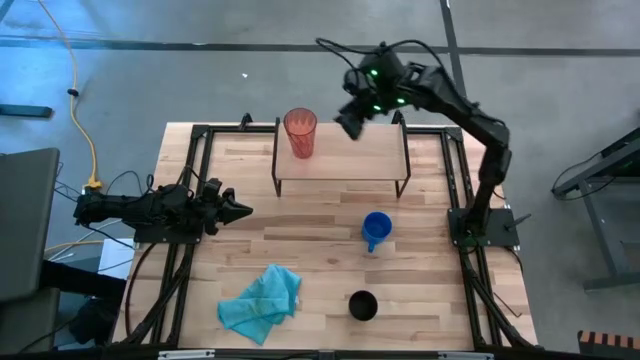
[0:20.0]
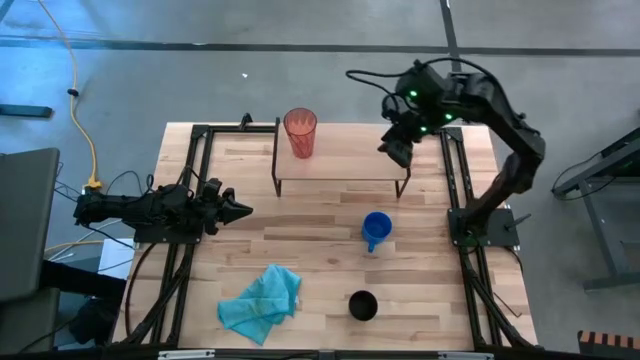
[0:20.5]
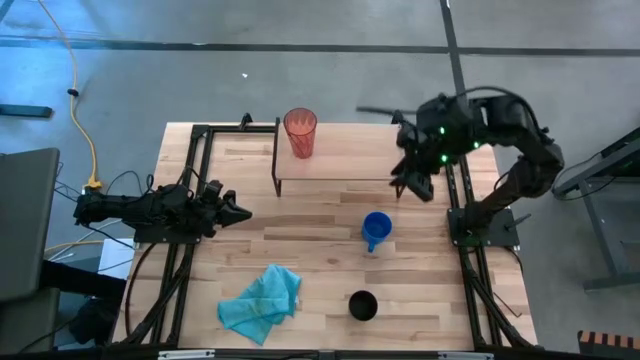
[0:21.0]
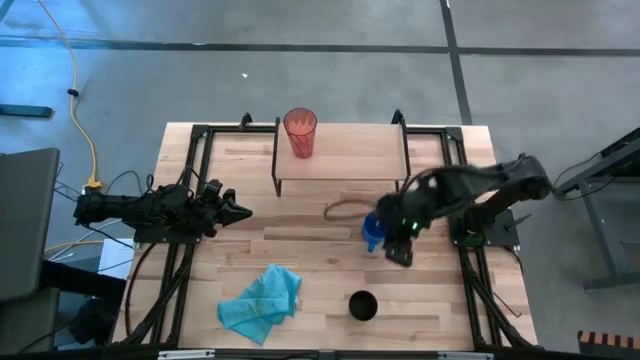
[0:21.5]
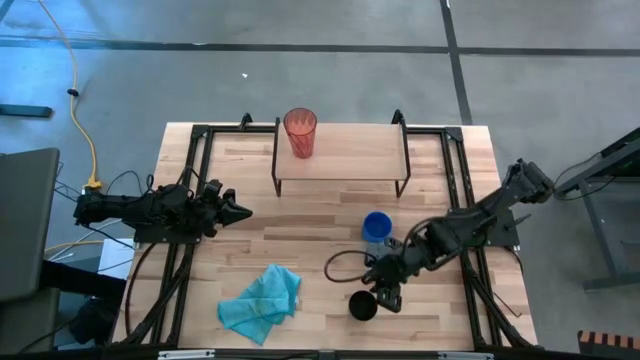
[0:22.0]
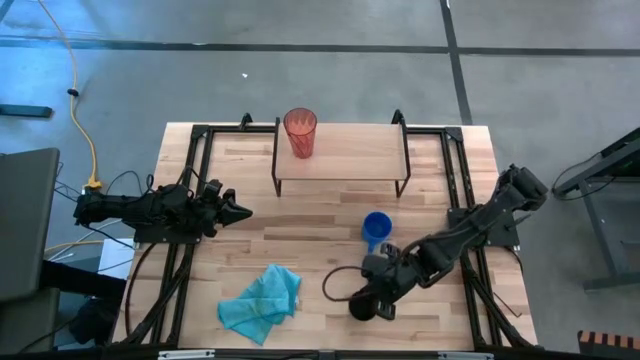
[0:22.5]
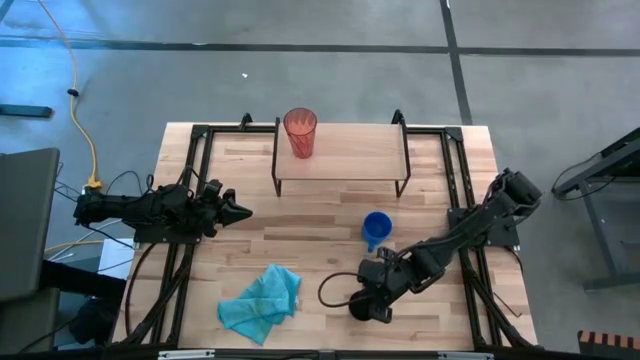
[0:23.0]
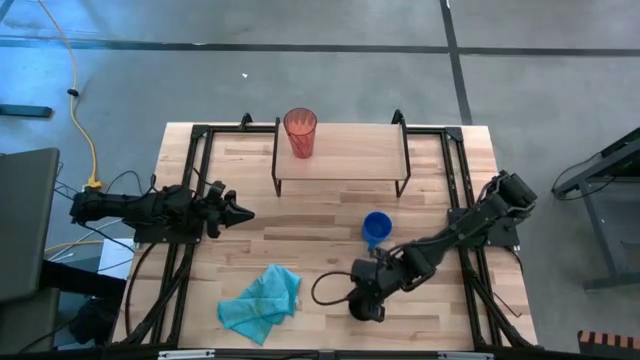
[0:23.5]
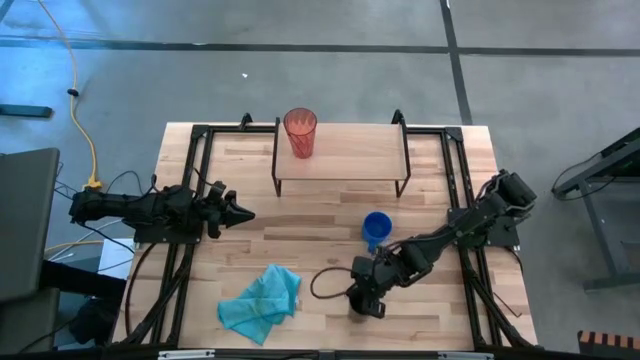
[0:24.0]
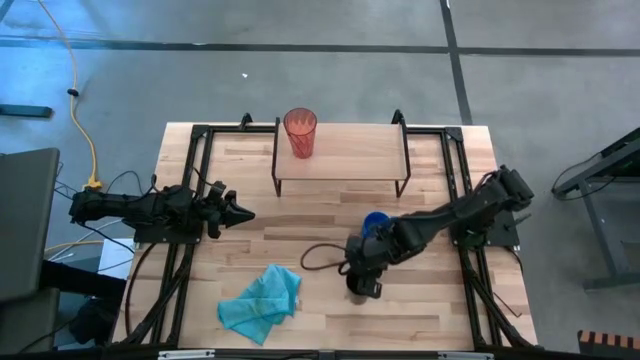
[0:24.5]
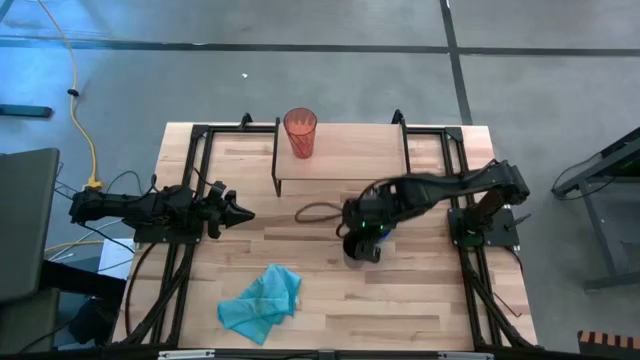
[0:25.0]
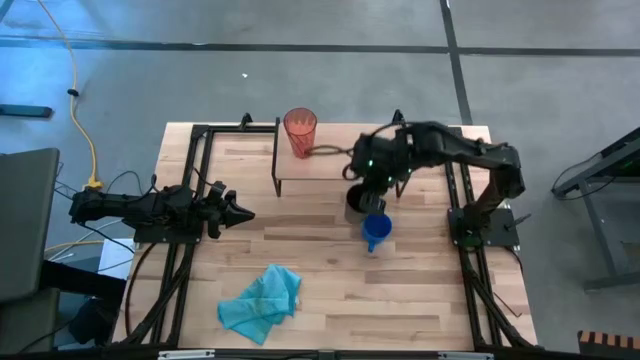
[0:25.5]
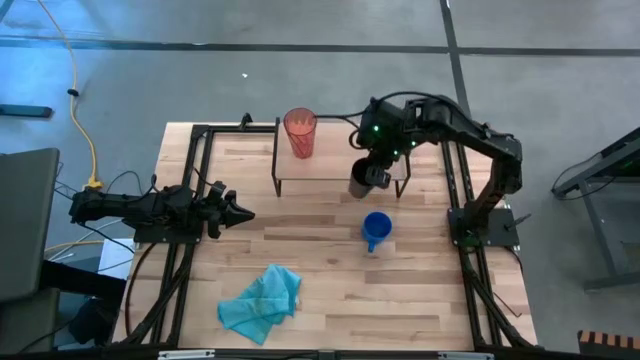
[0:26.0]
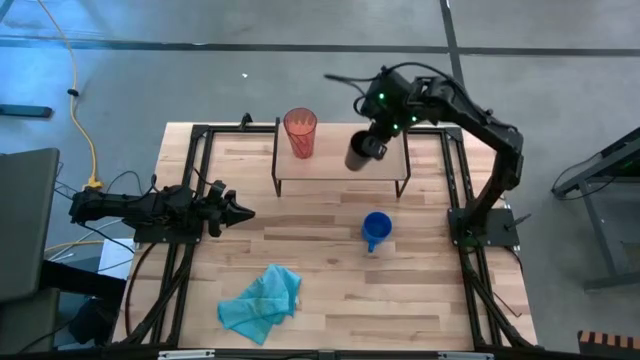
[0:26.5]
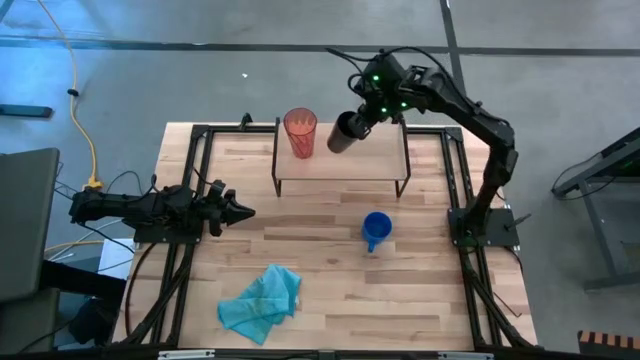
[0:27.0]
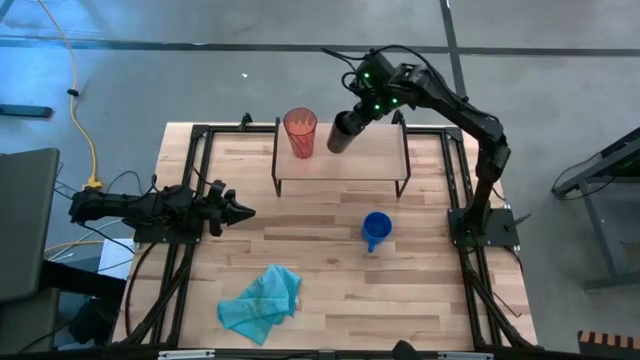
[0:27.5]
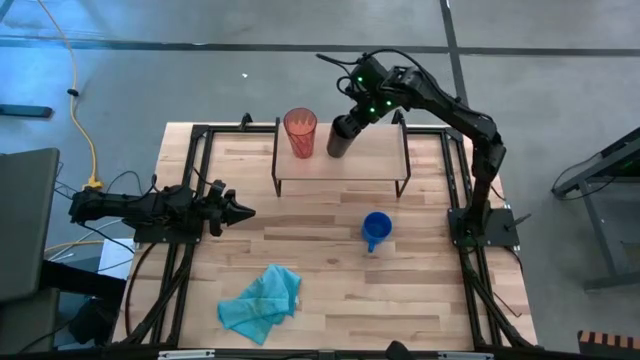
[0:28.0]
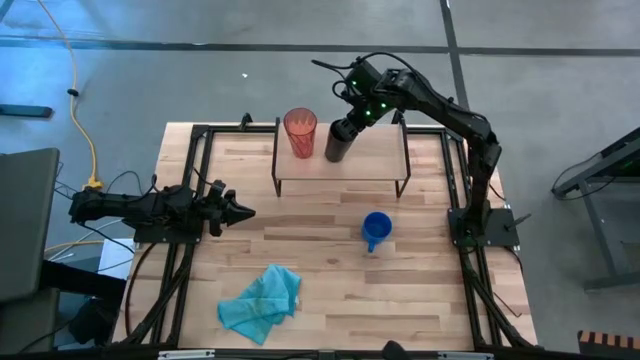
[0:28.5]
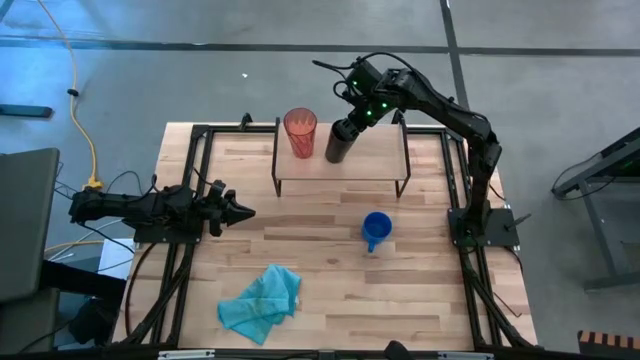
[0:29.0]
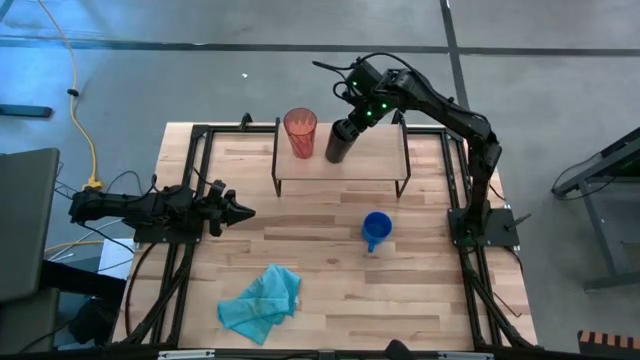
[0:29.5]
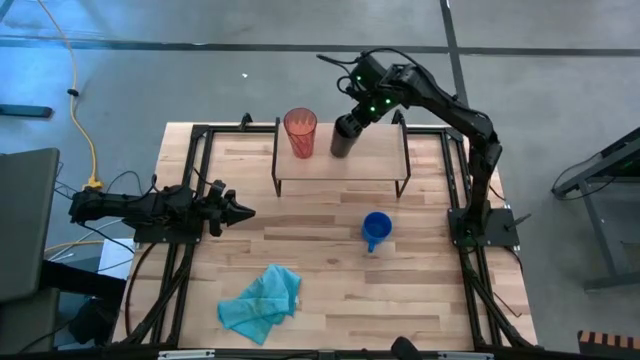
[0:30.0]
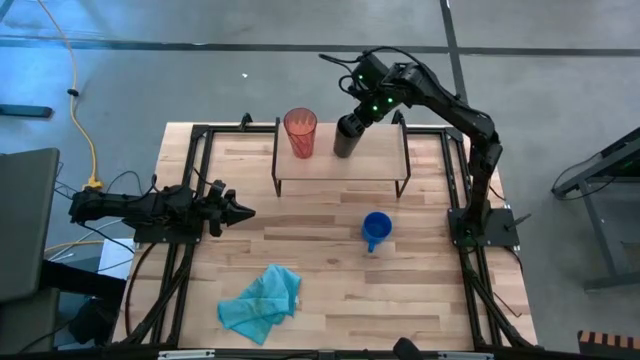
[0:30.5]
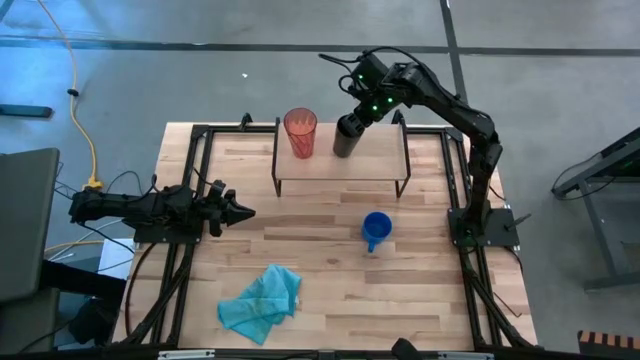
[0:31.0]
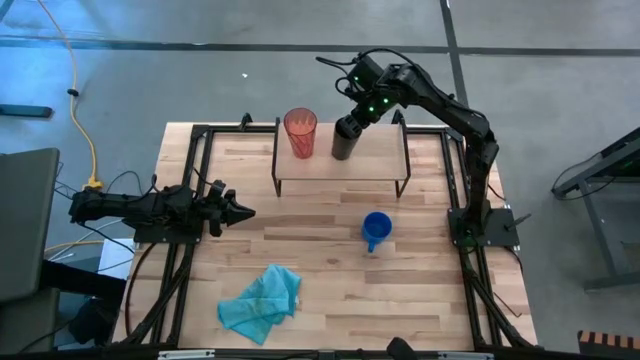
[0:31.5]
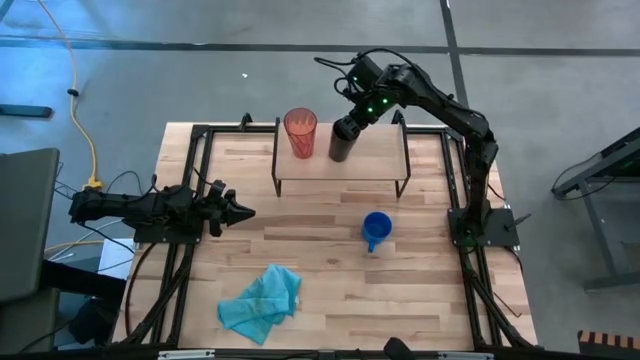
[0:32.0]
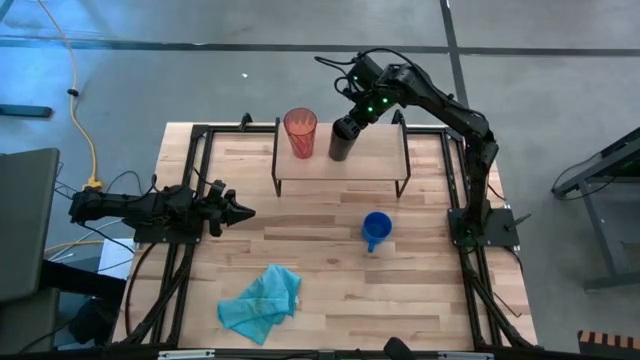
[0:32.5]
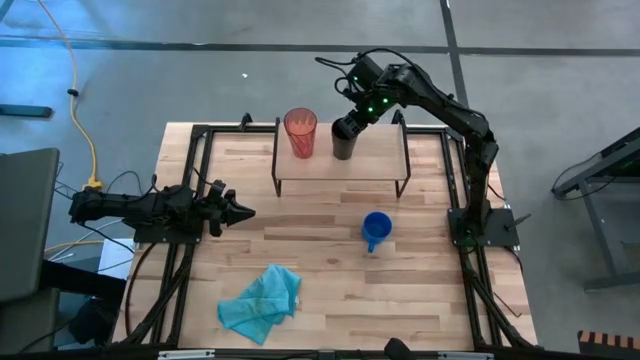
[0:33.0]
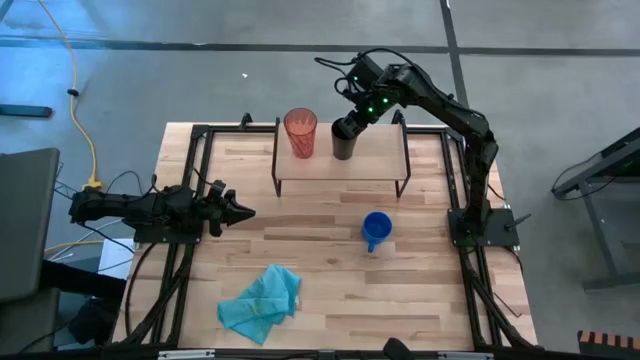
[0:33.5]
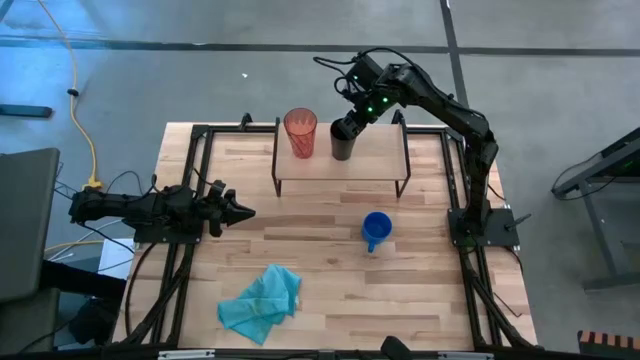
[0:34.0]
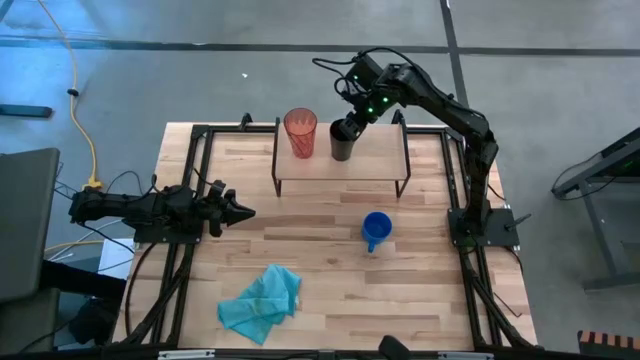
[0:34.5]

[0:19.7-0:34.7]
Task: Stack small to large cups/mugs on shelf
Put the black cup on the shelf

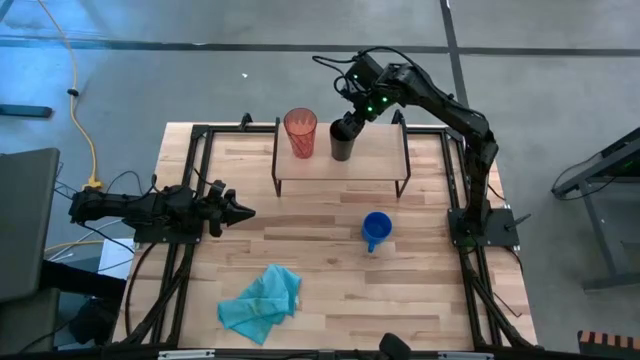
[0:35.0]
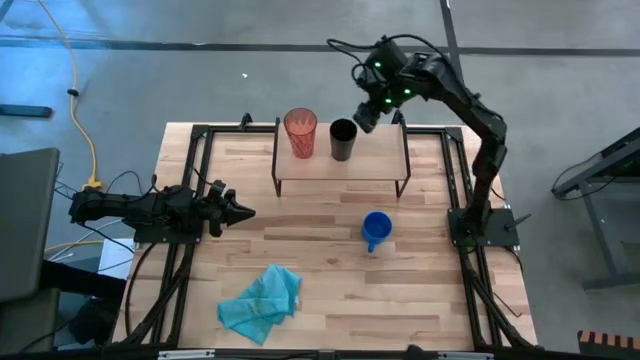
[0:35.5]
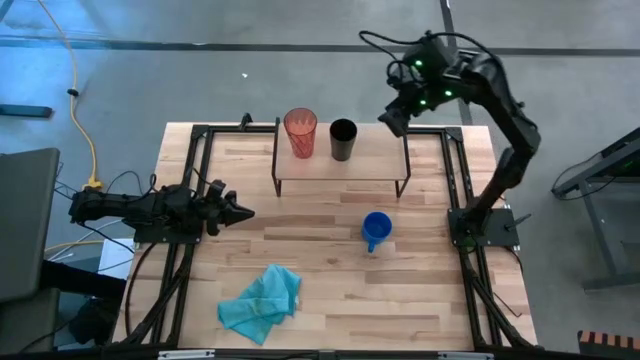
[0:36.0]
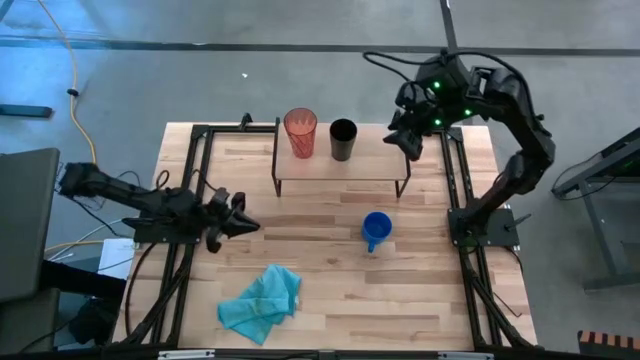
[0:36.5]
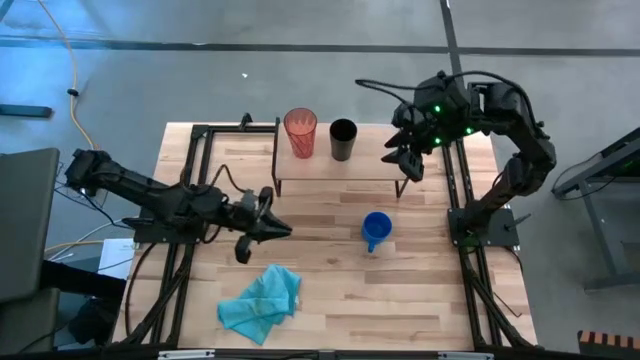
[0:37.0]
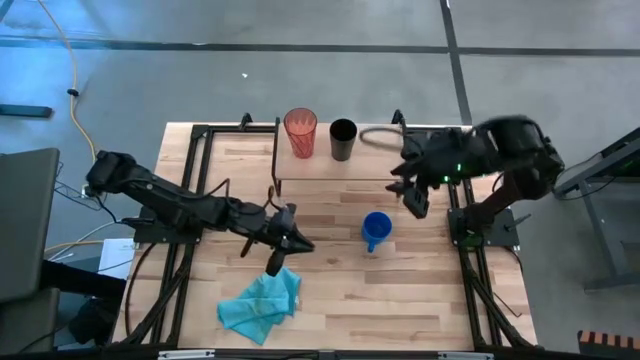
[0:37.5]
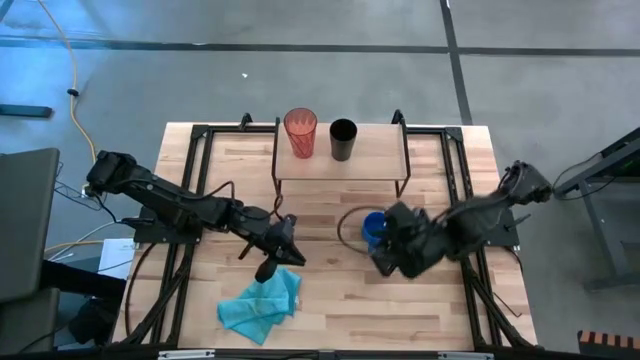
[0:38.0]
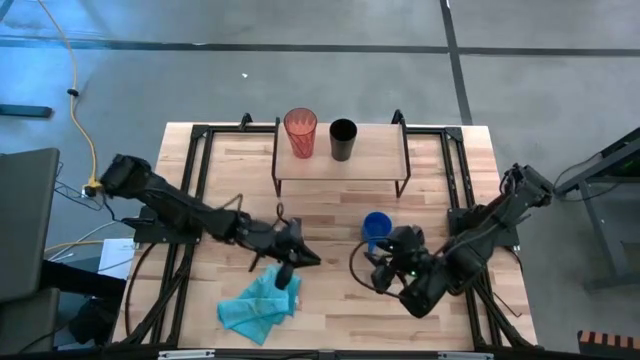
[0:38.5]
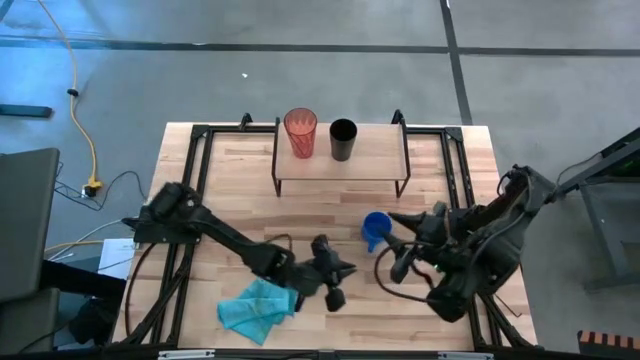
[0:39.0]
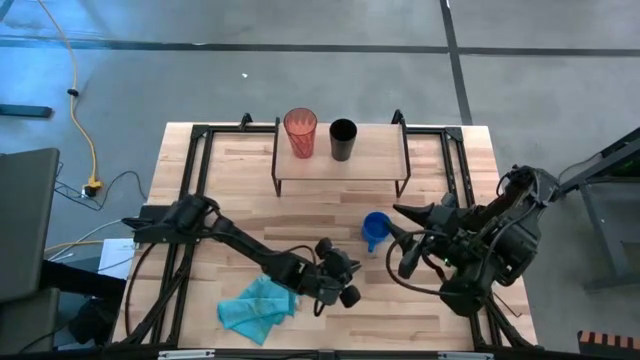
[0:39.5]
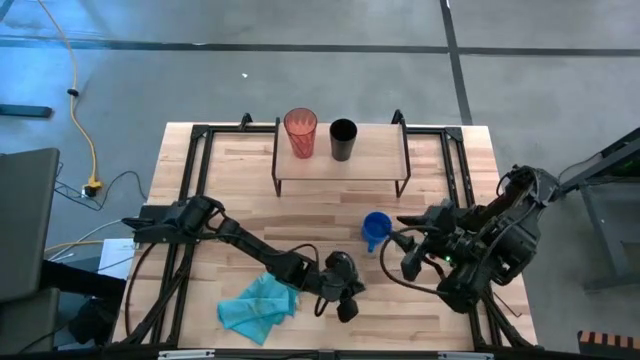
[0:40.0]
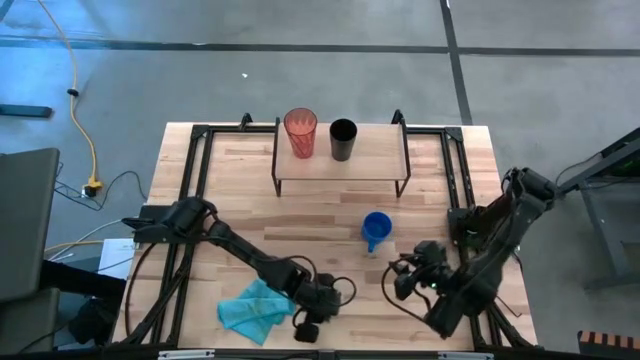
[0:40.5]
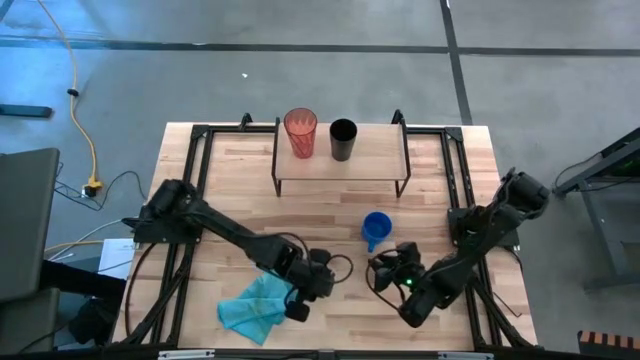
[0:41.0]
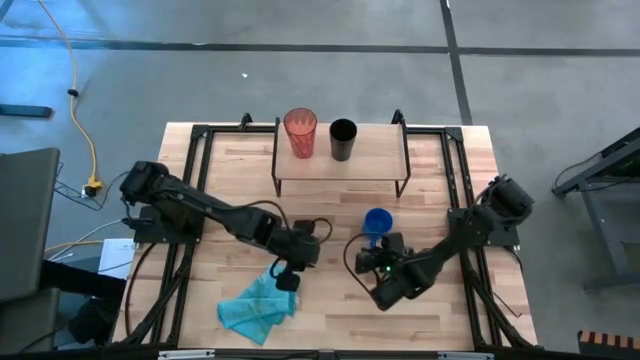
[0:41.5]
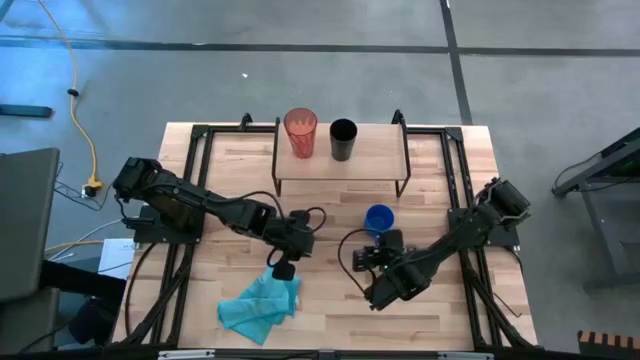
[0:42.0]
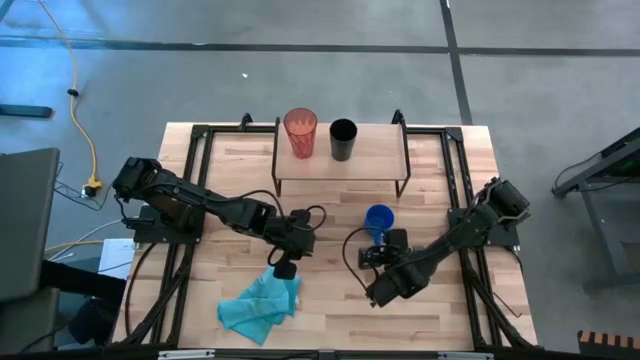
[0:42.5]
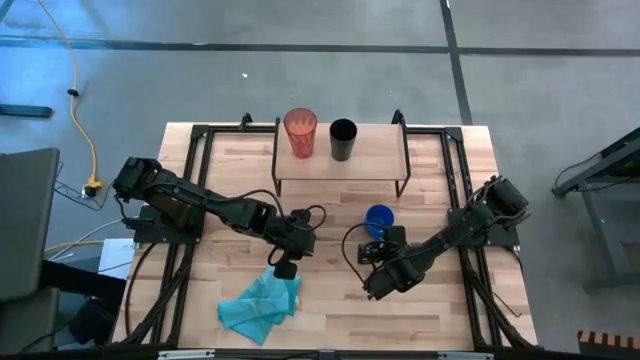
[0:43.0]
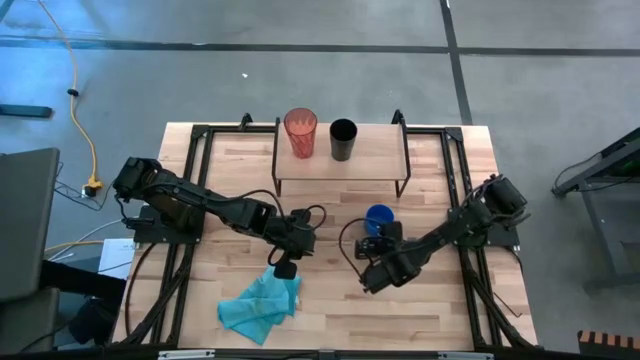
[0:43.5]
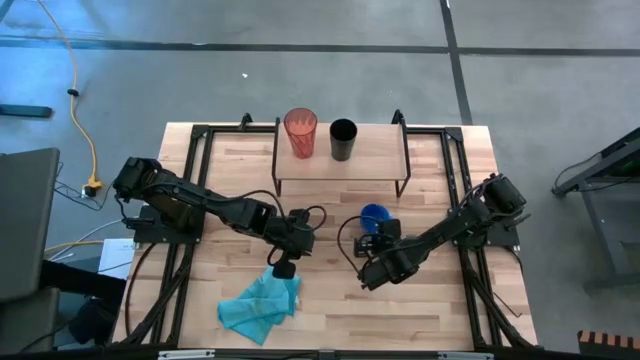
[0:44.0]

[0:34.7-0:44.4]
Put the blue mug on the shelf
